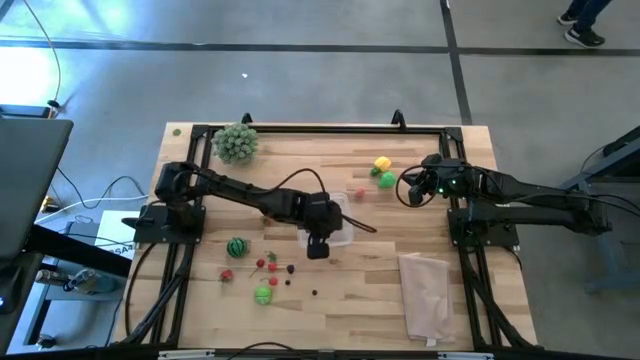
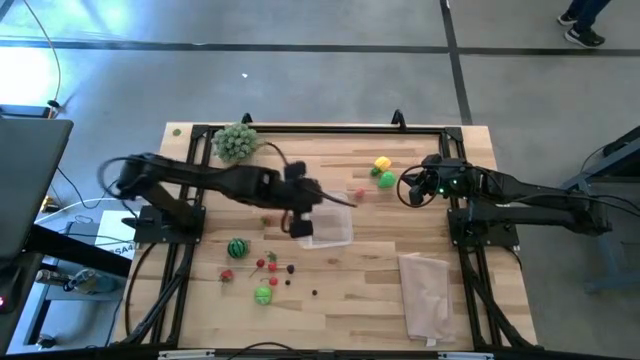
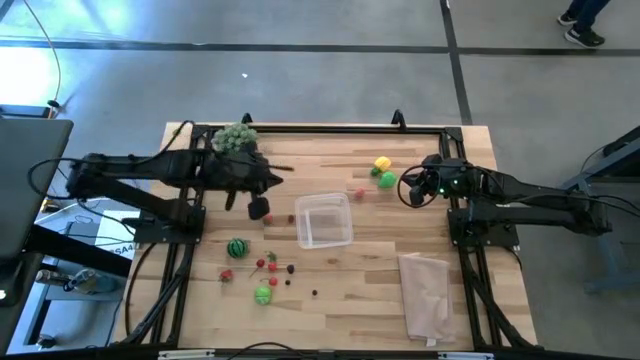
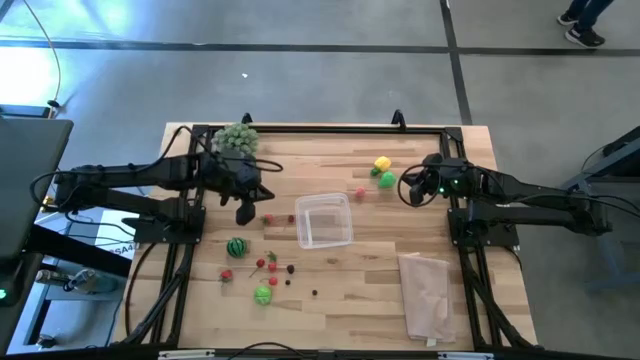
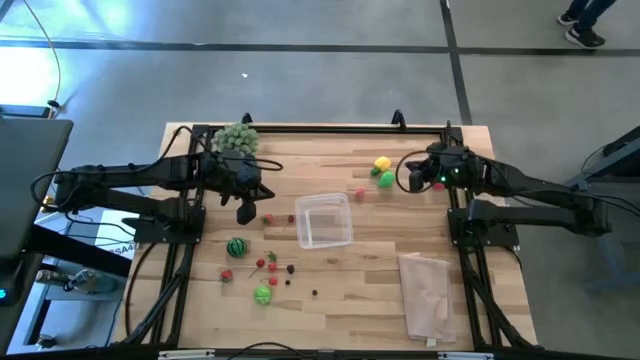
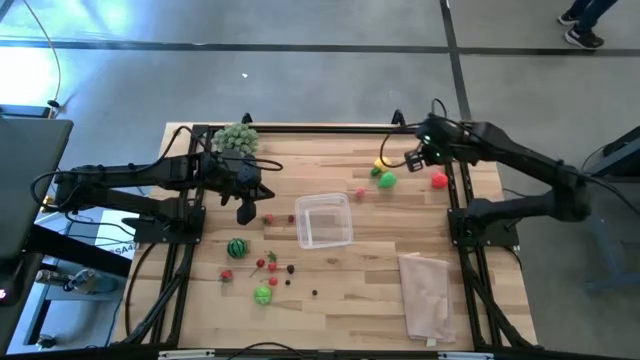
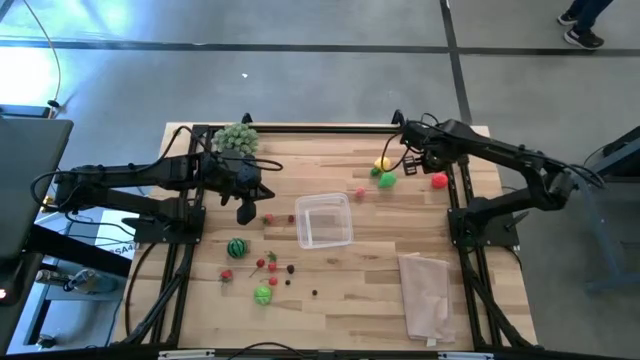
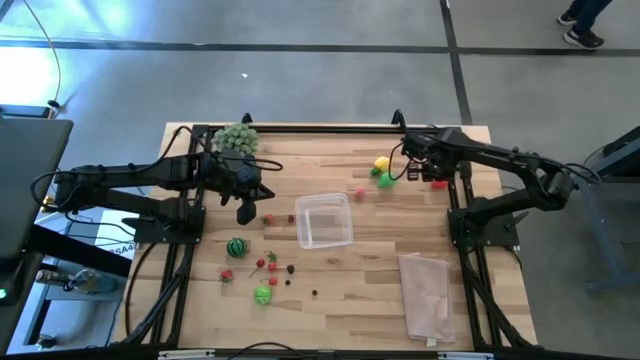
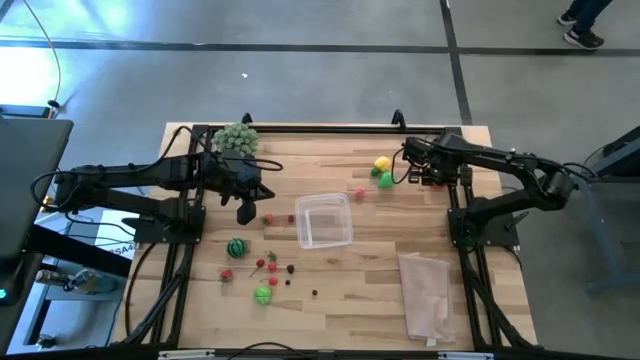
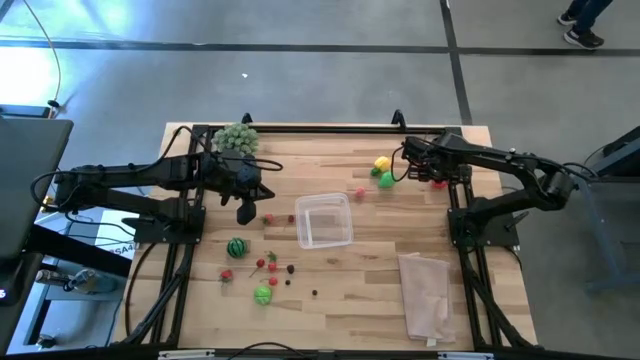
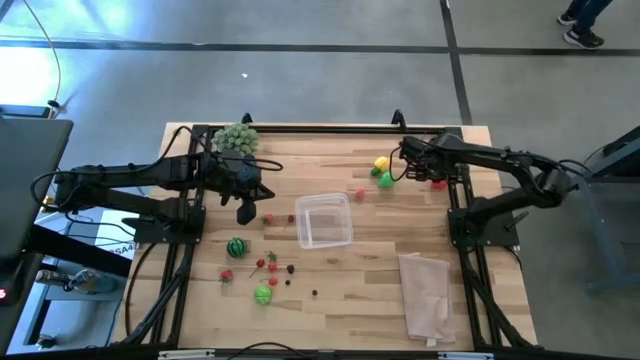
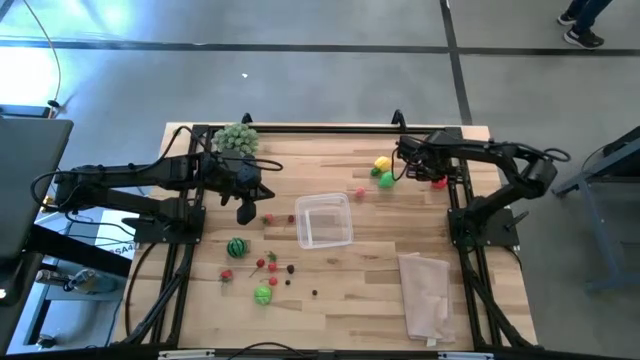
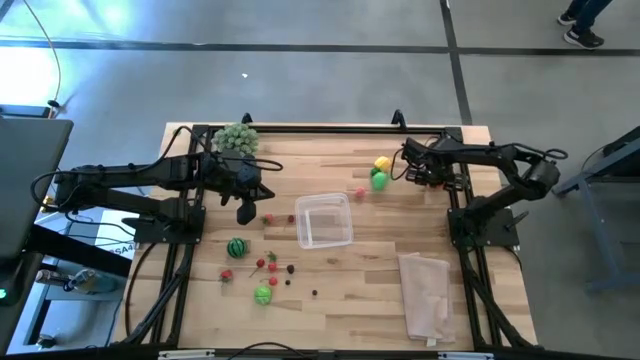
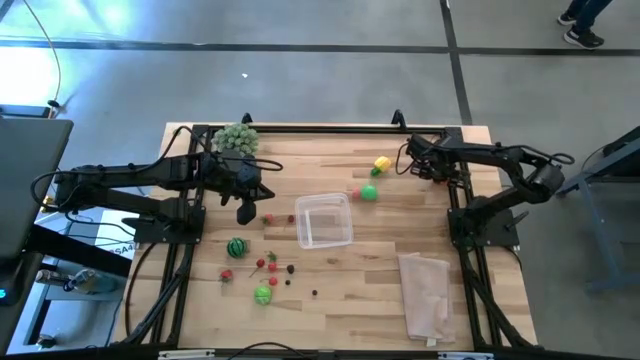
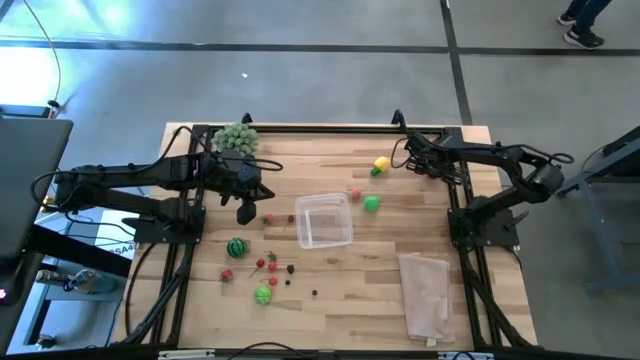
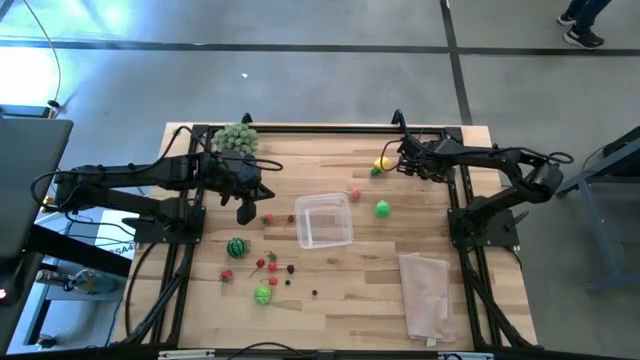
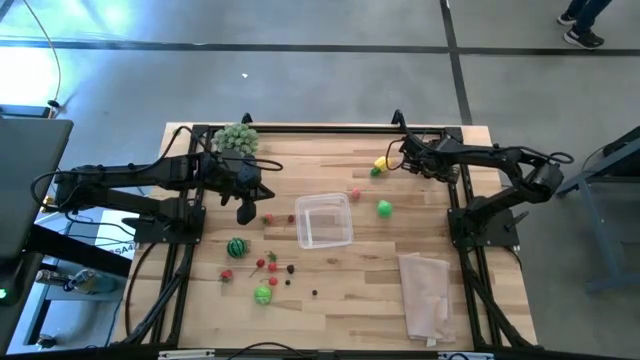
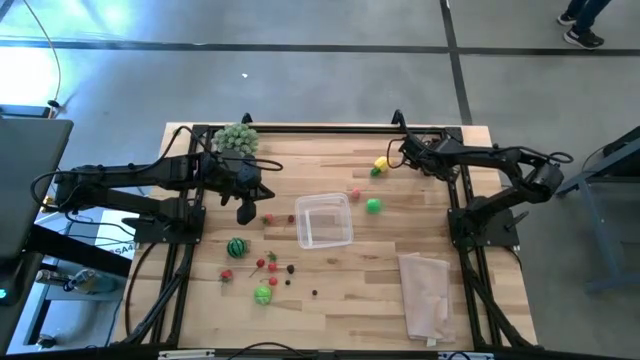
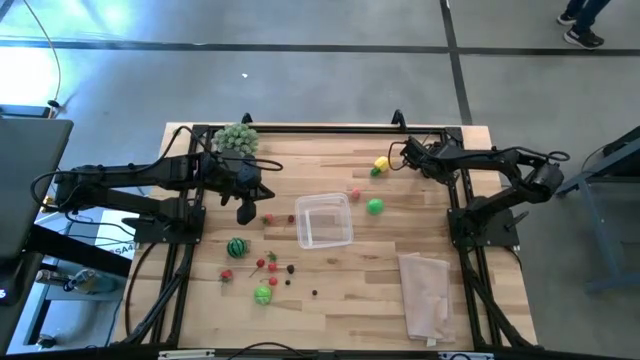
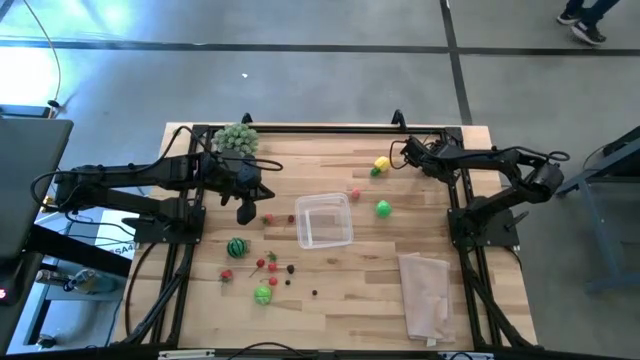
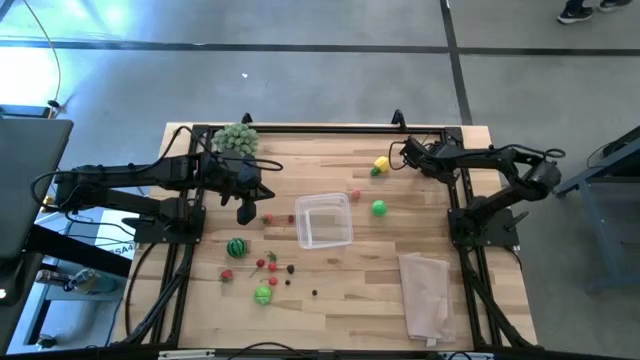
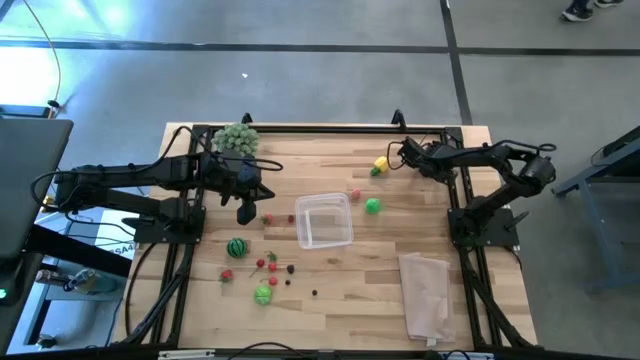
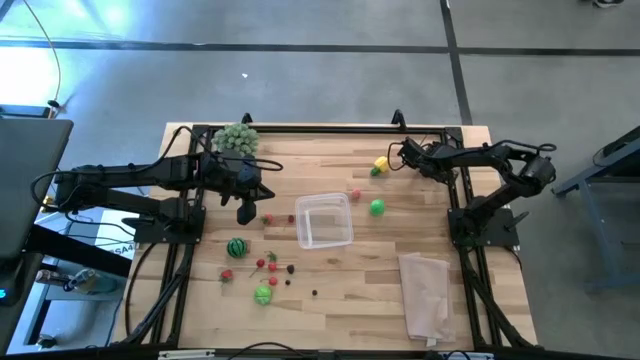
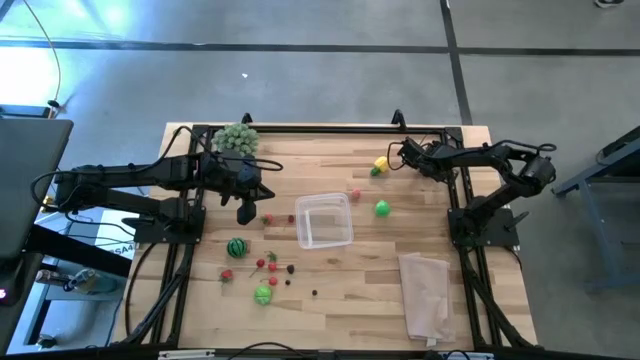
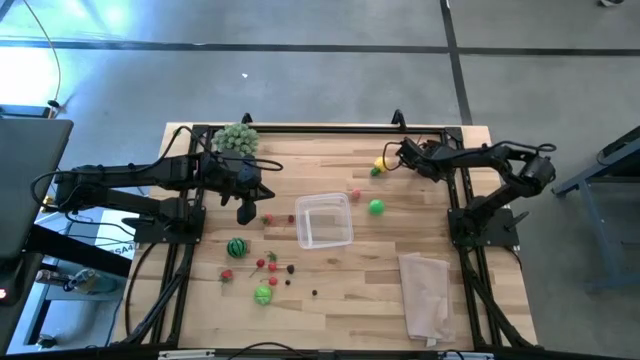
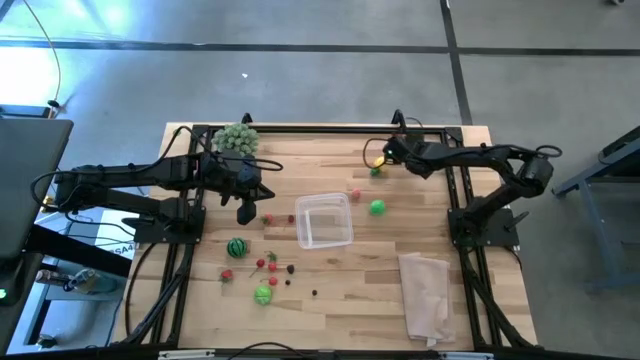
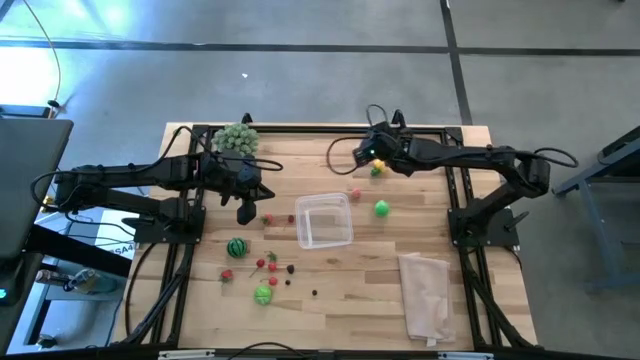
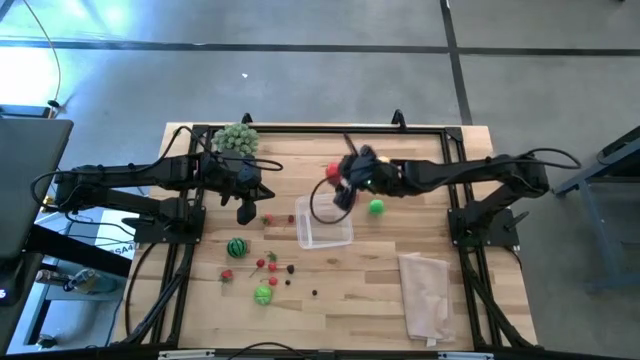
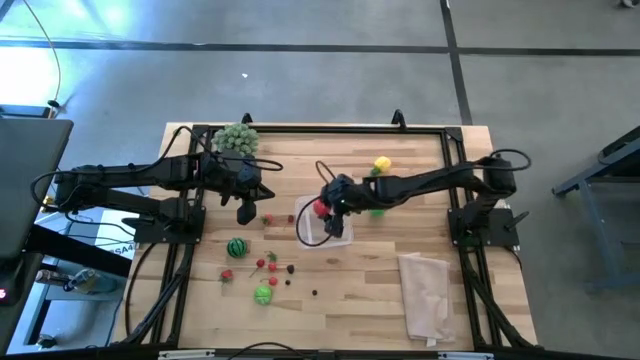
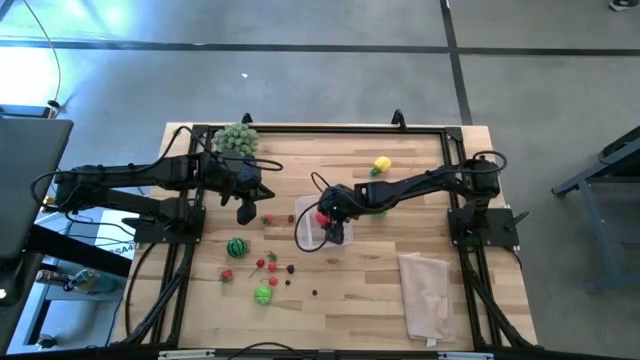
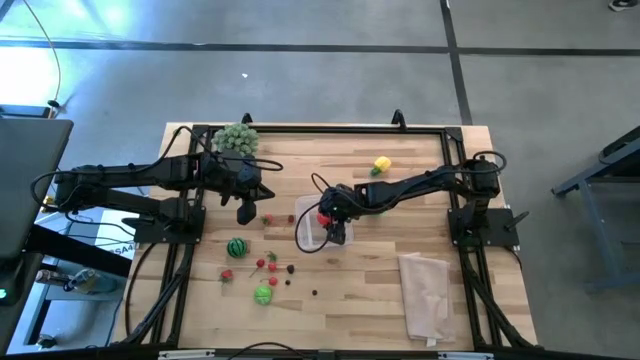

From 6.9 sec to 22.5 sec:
Task: Pick and placing Produce into tupperware
Put the red tomato into the transparent bin

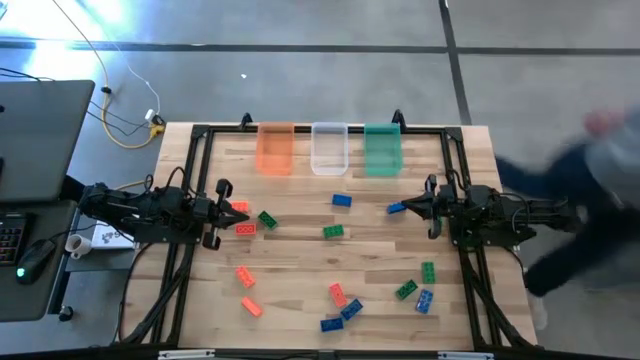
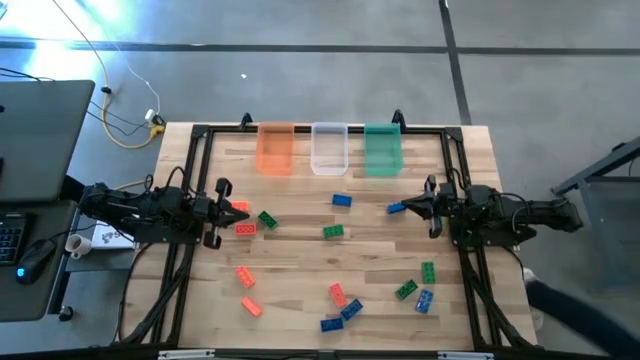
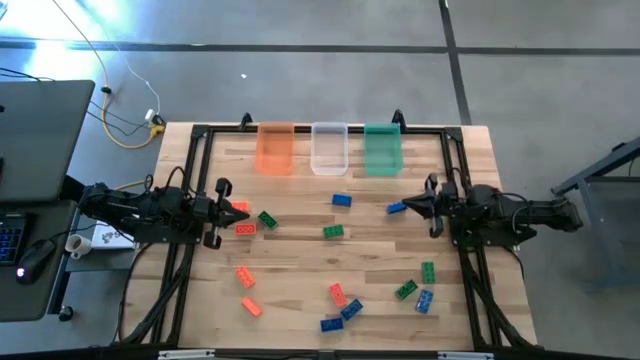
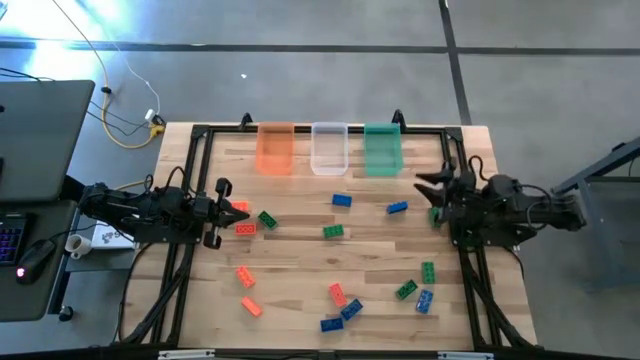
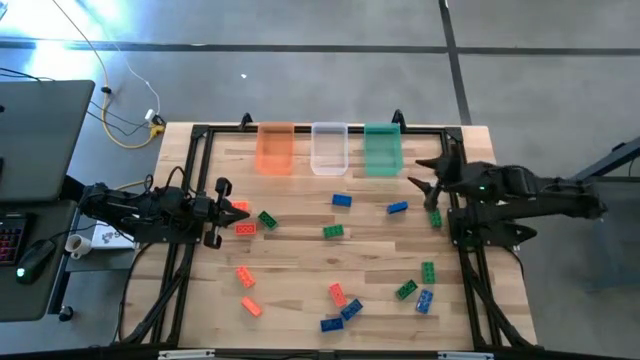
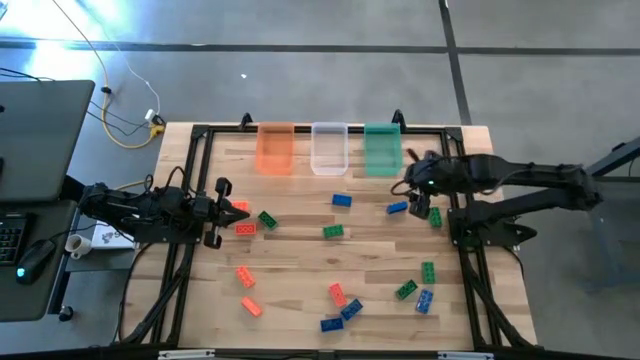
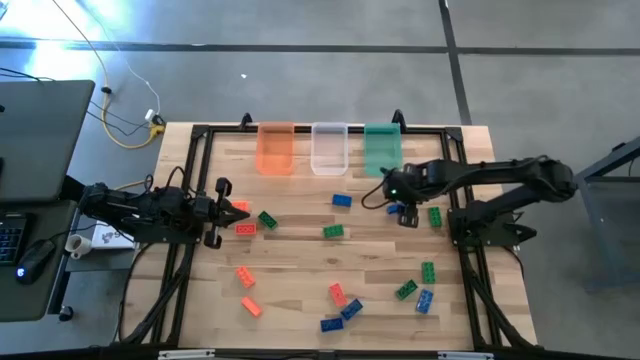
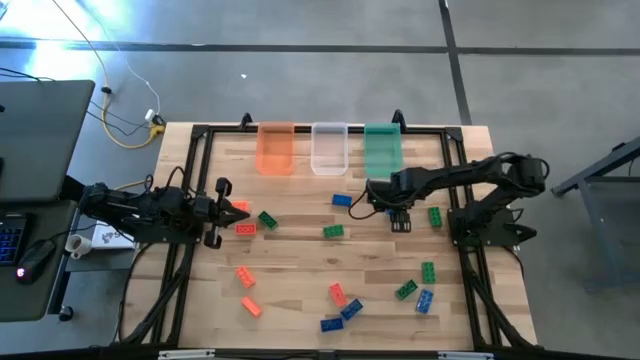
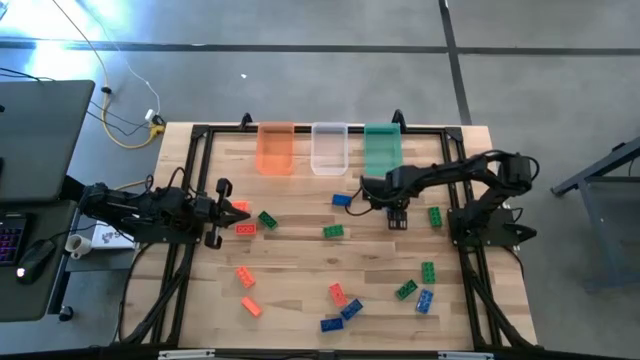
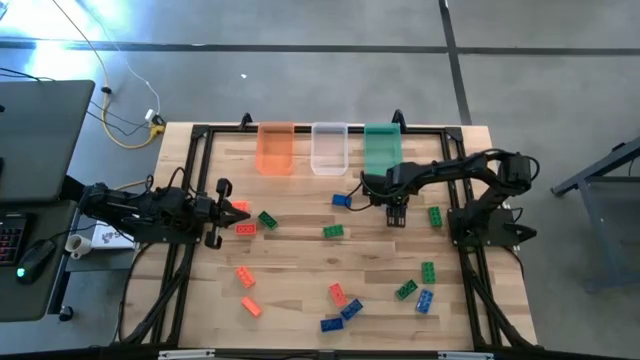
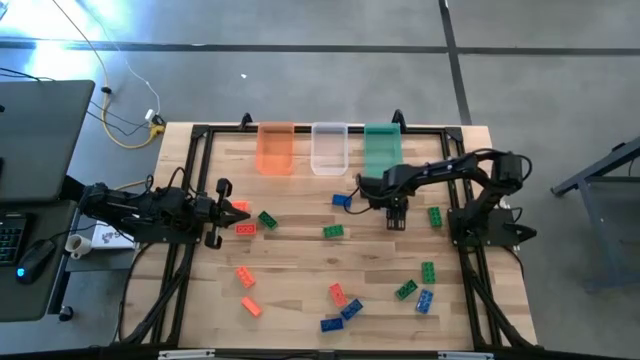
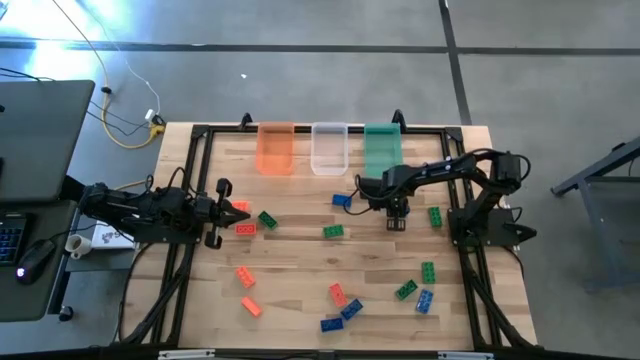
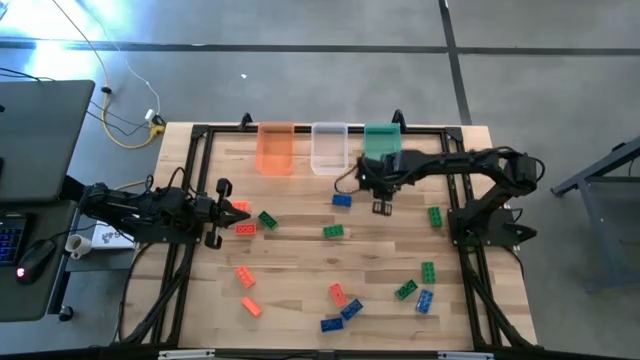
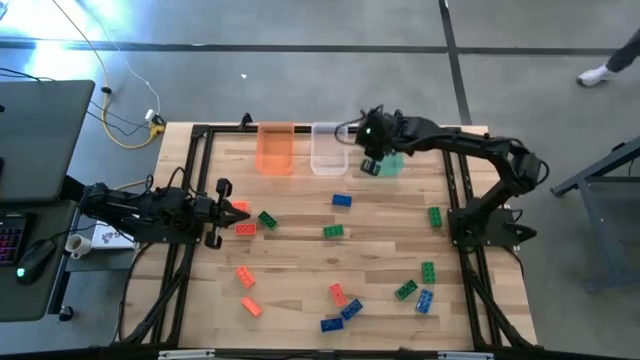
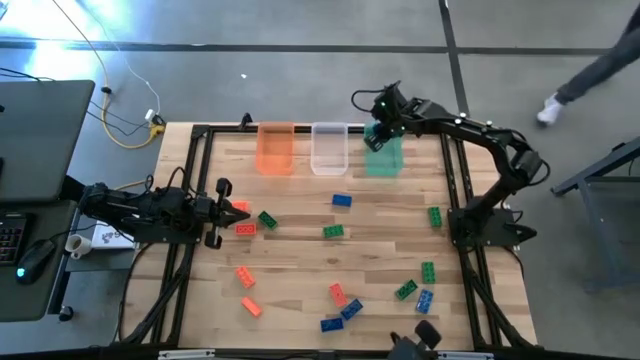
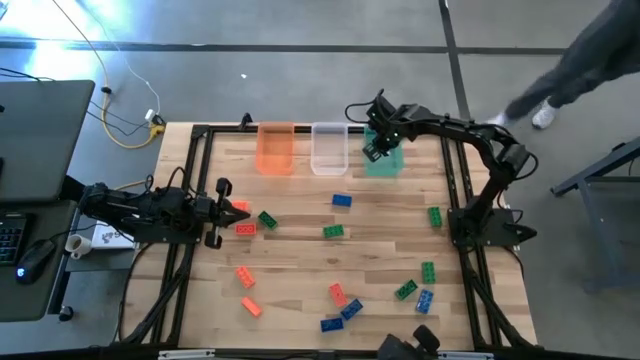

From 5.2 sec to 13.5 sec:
Task: Sort & place blocks by color
Put the blue game piece into the green bin
